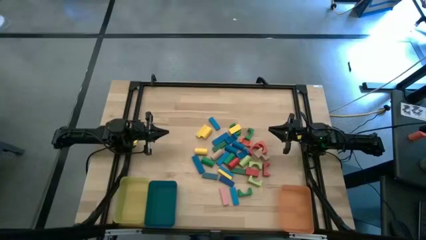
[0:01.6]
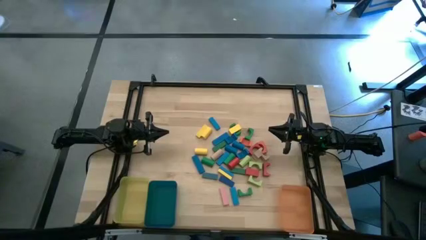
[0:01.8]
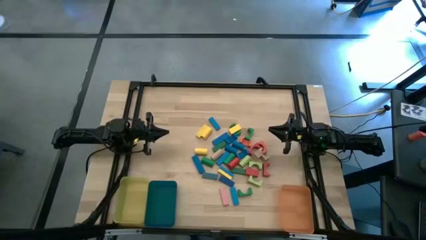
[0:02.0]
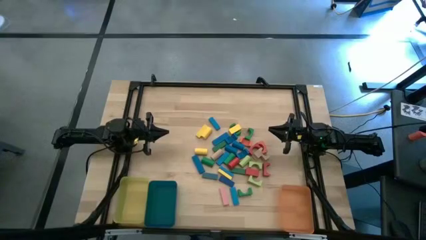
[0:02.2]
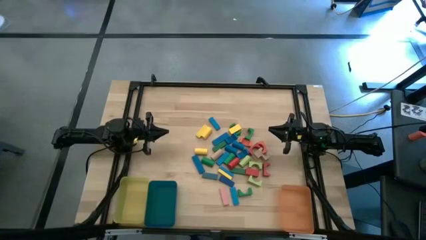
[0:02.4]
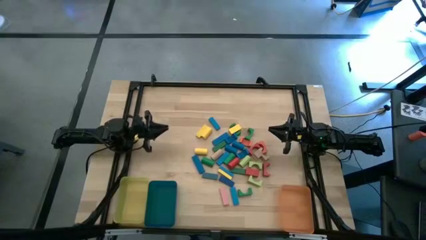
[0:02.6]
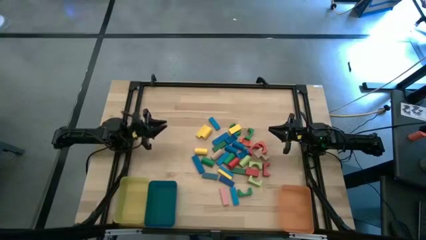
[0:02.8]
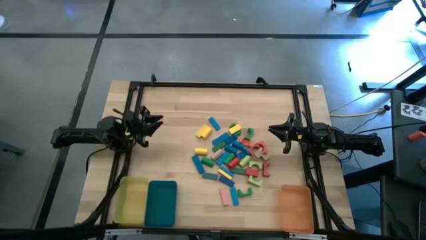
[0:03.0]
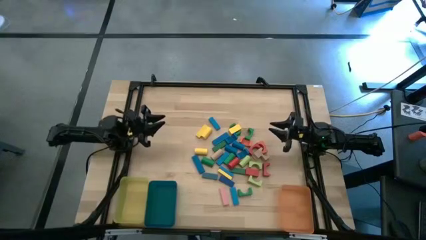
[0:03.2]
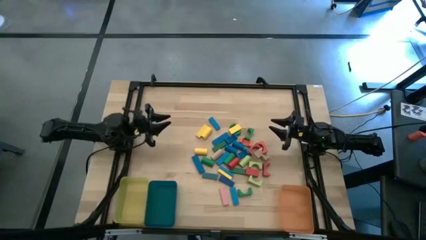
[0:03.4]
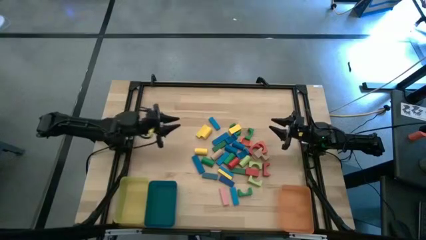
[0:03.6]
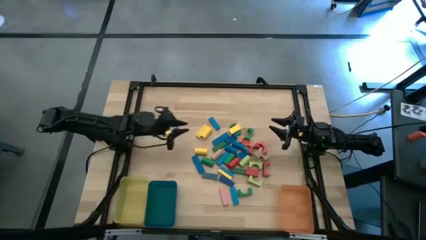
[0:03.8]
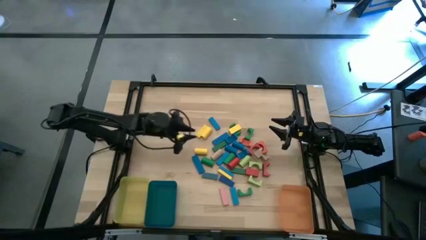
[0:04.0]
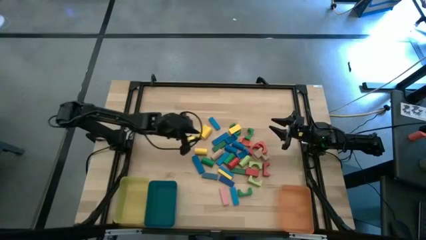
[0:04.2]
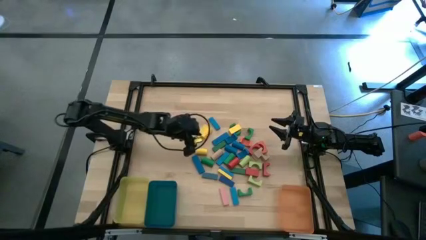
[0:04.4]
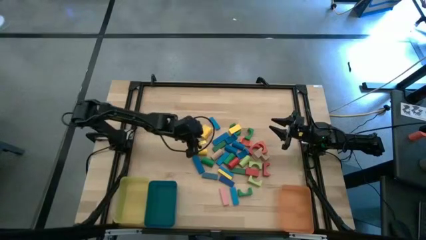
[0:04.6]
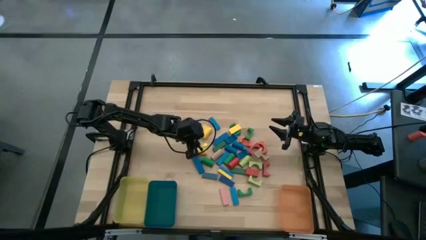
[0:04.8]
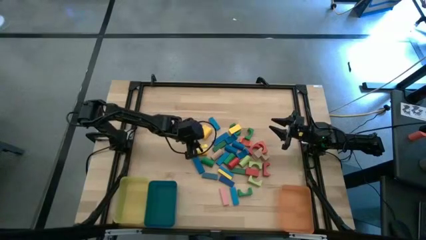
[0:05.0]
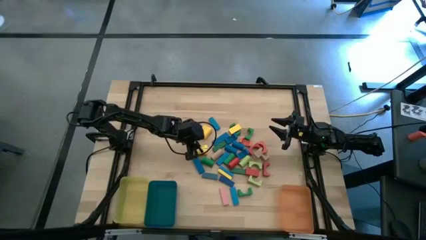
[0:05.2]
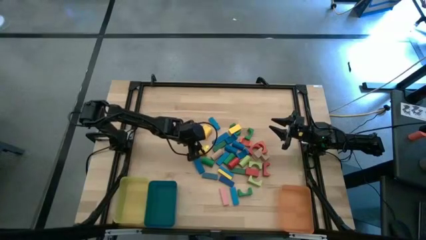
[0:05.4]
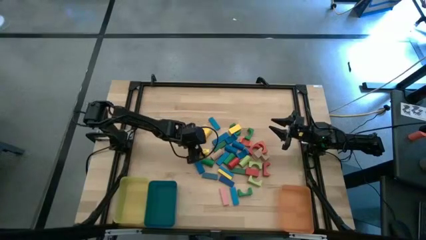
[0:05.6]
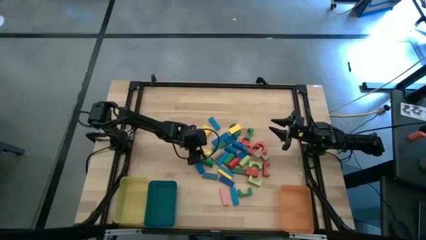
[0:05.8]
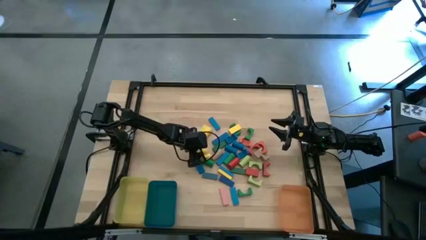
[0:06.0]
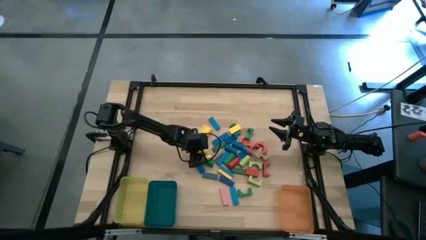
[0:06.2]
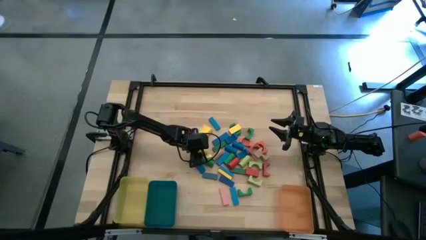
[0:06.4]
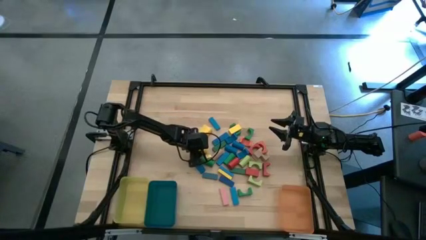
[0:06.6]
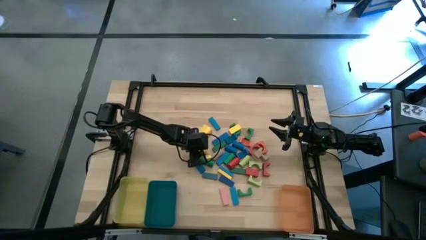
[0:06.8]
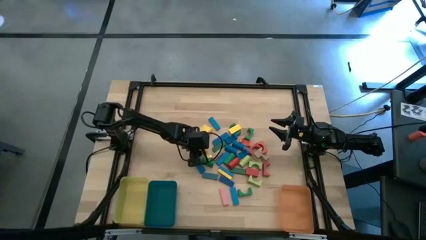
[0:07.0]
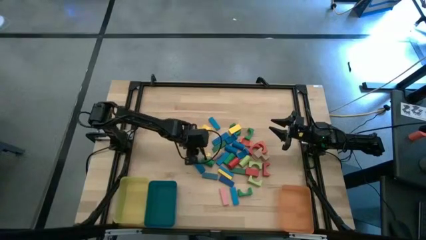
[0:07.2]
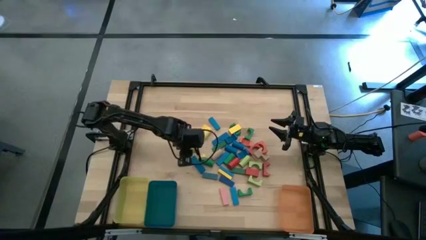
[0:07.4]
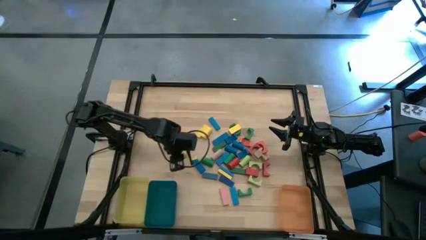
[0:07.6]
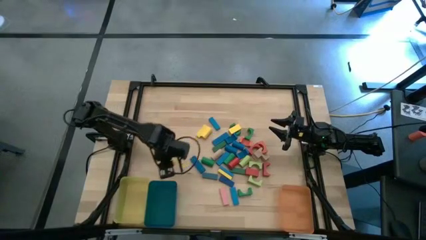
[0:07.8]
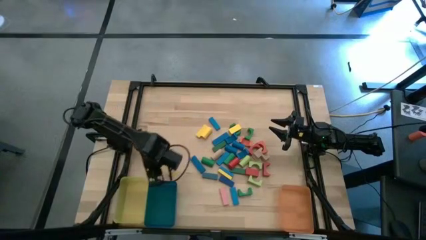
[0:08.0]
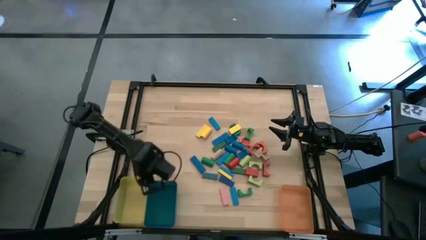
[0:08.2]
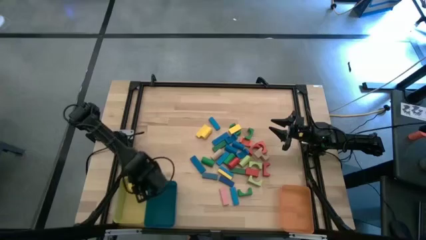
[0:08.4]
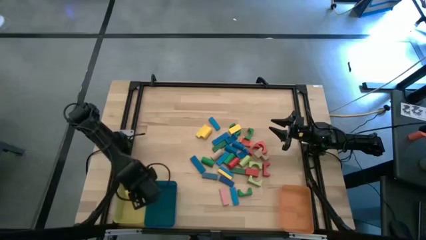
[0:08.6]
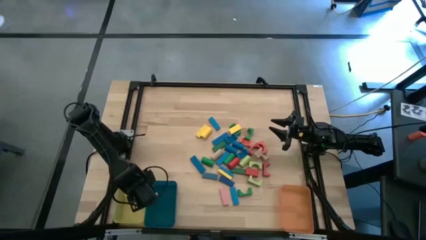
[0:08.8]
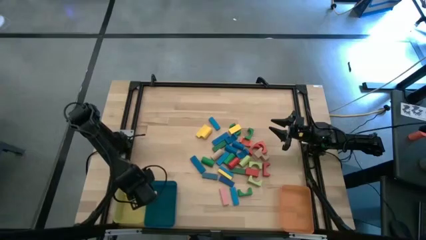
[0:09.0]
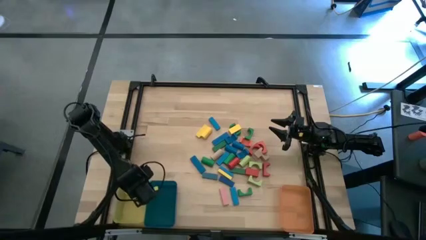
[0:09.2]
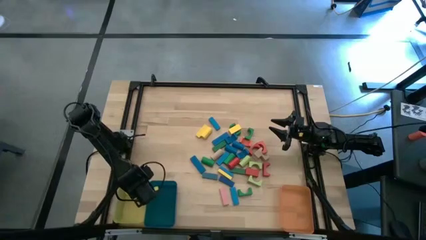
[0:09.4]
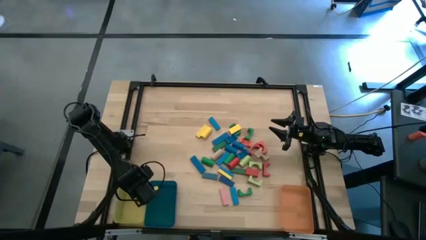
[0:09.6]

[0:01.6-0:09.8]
Task: Sort blocks by size
Put the yellow cylindrical block into the yellow bin

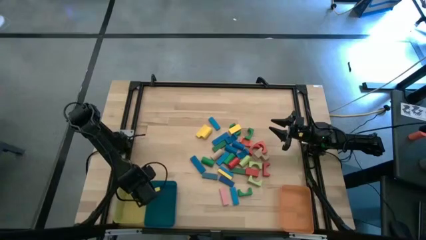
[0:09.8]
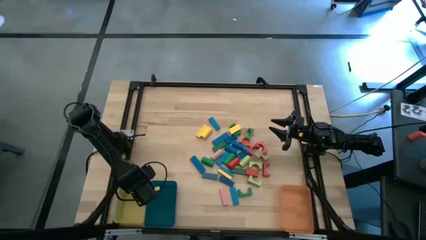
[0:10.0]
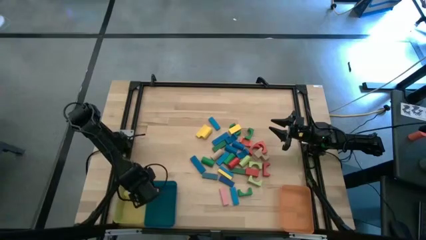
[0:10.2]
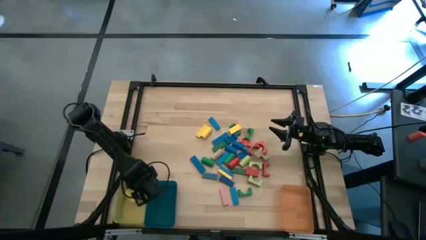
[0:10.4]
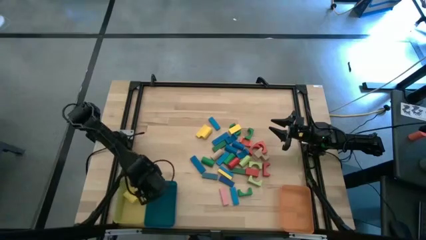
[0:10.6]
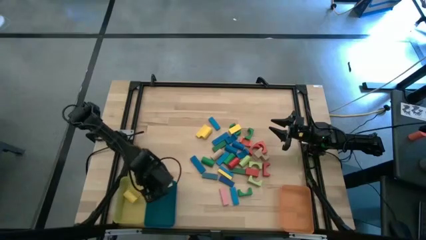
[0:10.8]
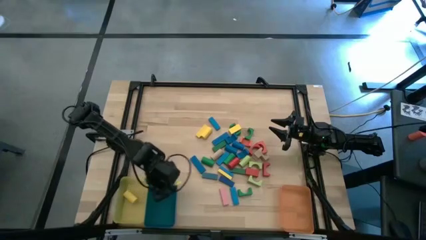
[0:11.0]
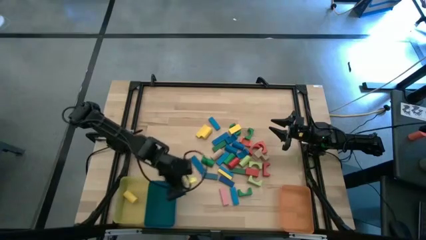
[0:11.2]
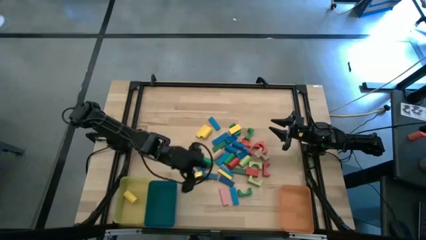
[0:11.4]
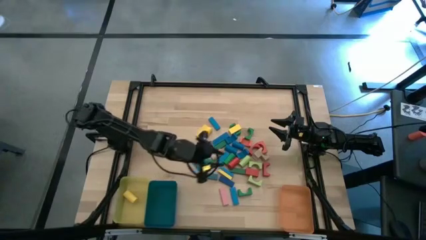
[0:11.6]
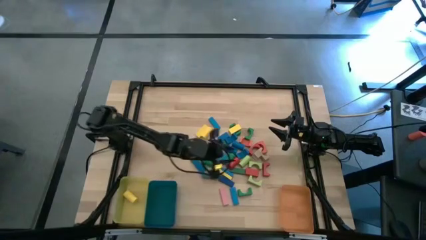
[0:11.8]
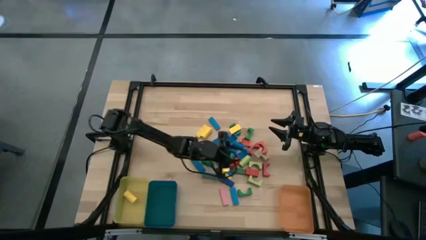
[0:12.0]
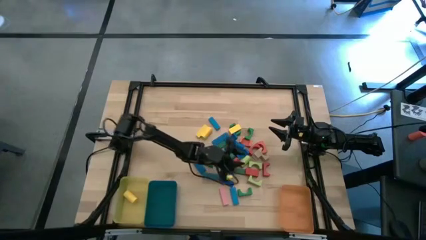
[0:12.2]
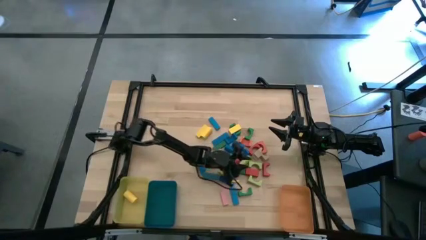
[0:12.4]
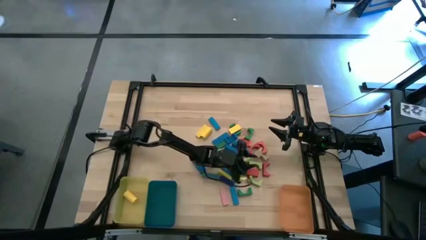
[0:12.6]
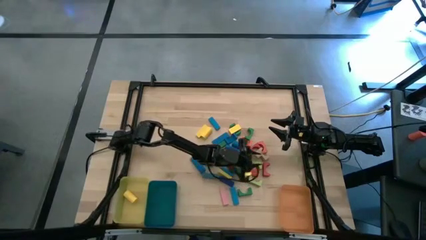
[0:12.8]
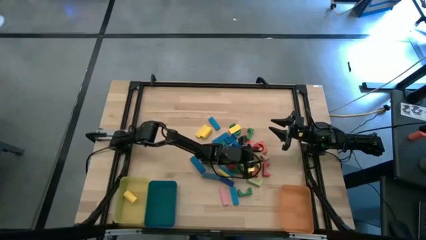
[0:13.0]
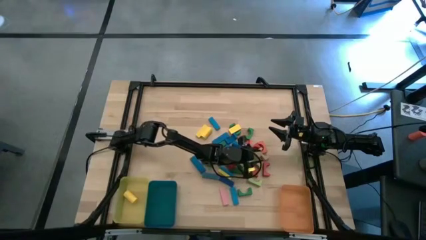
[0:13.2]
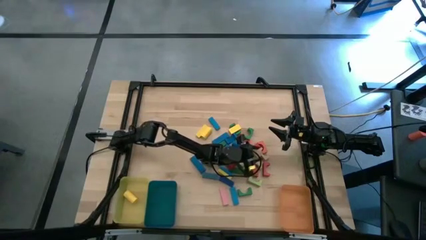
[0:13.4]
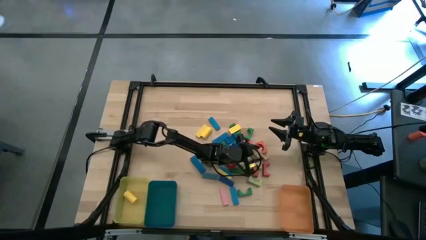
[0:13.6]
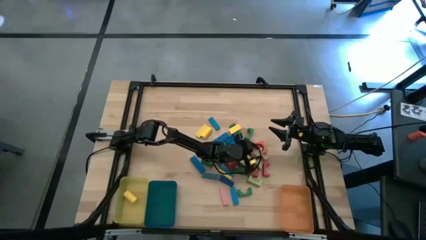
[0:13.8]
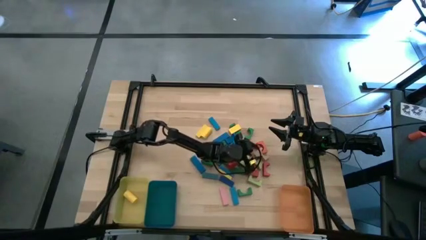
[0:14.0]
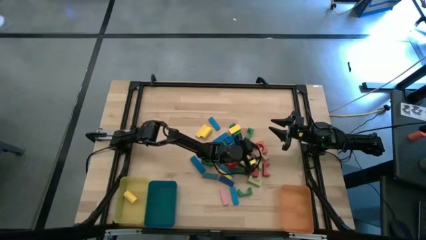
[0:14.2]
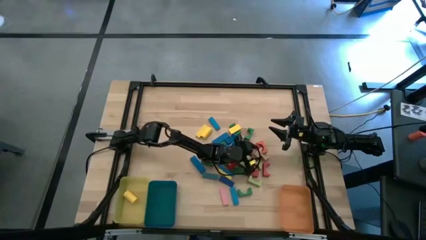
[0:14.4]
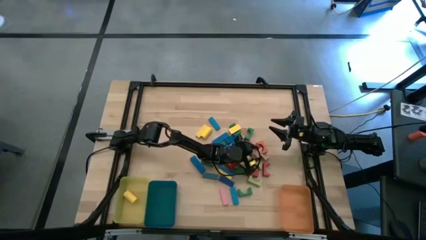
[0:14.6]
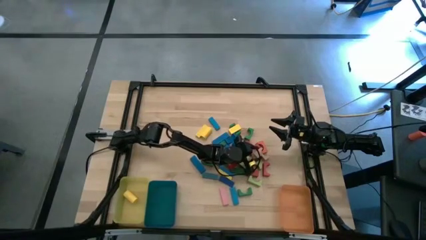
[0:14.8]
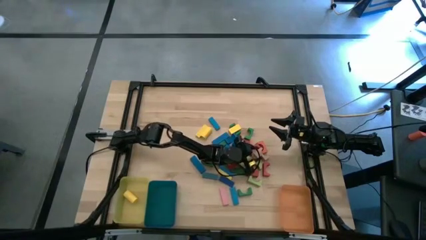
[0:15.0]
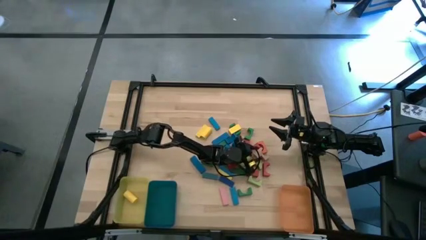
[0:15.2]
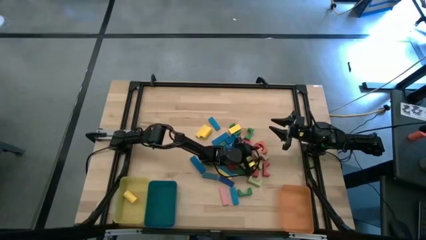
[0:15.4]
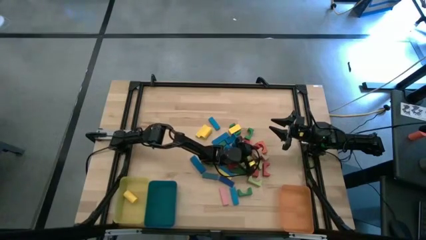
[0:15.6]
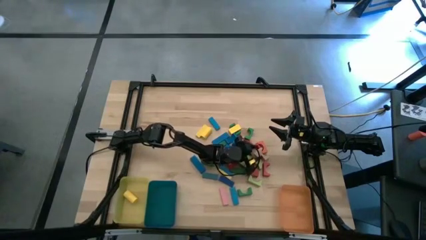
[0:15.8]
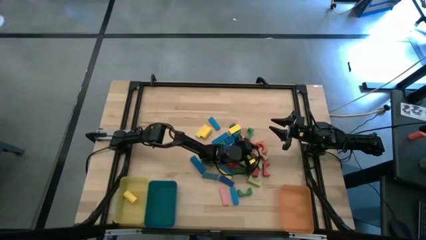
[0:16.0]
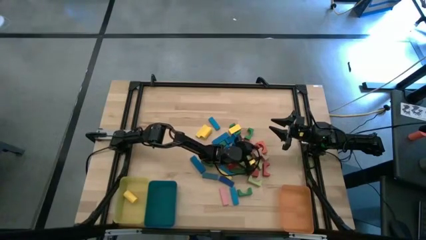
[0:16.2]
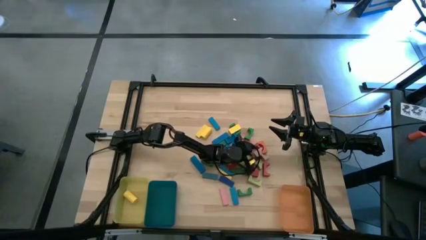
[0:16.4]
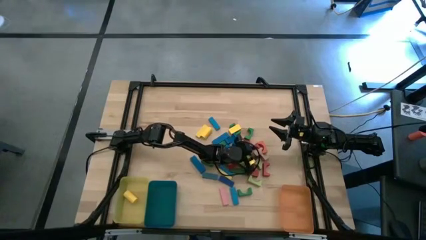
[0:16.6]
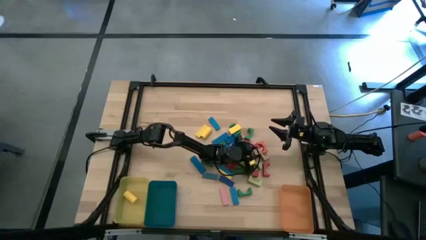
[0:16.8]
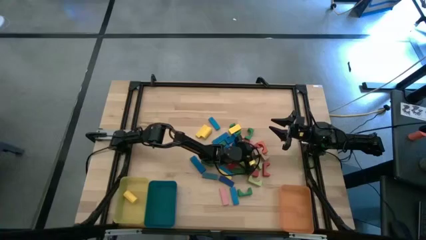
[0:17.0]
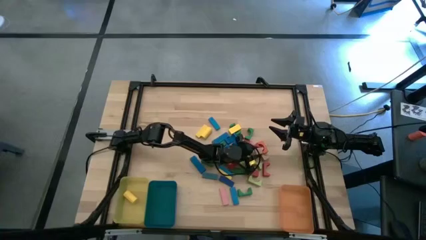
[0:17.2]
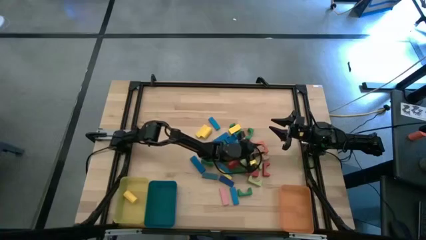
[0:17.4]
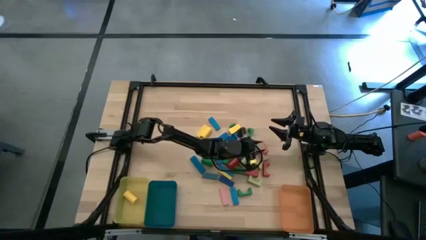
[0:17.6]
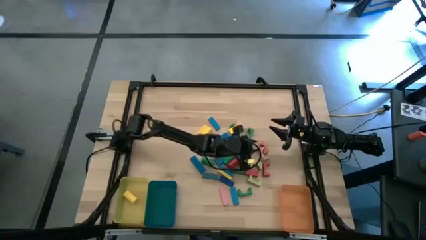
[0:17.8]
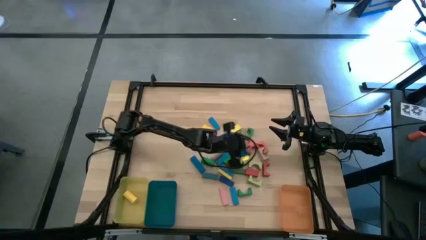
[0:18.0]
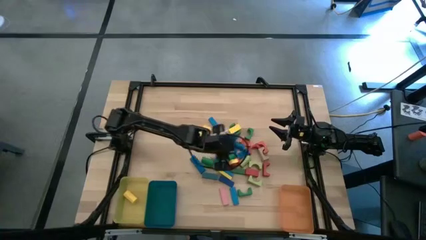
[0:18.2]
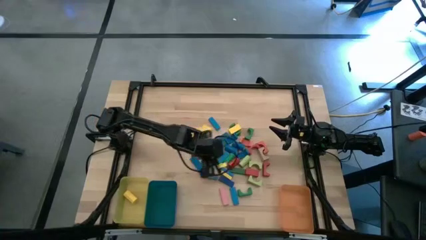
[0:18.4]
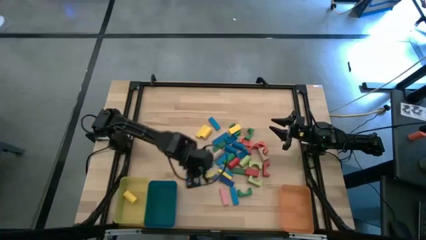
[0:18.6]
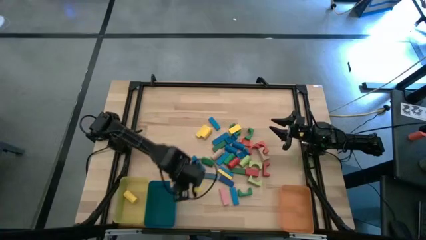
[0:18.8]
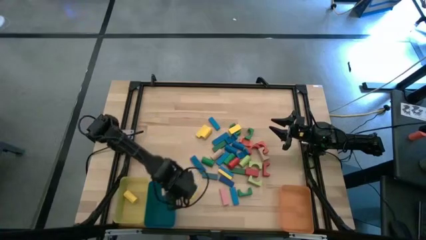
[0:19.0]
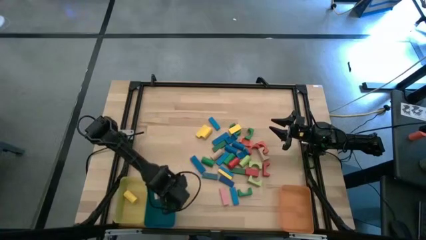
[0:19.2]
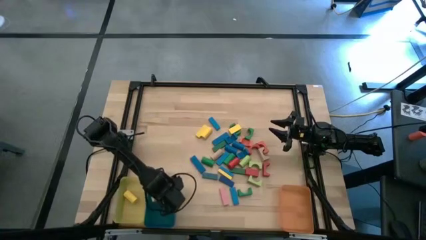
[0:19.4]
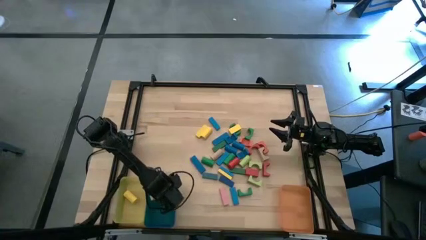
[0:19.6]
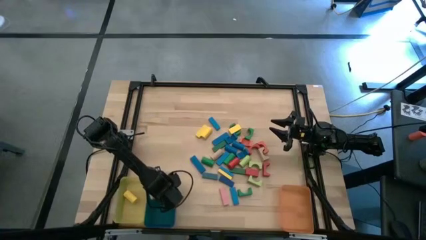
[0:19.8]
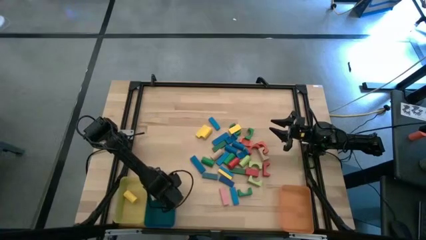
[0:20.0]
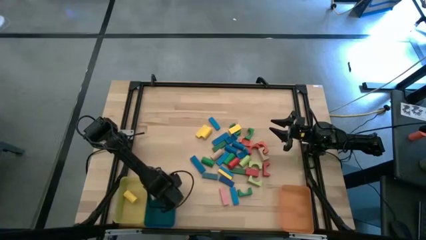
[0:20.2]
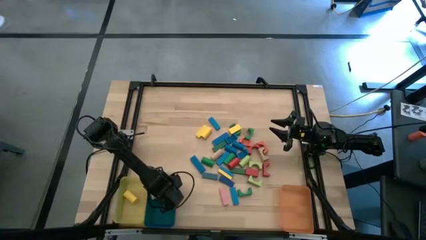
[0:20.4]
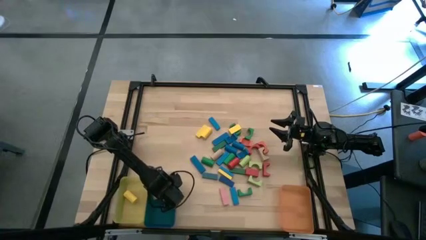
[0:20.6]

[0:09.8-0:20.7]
Put the brown arch block into the blue bin
